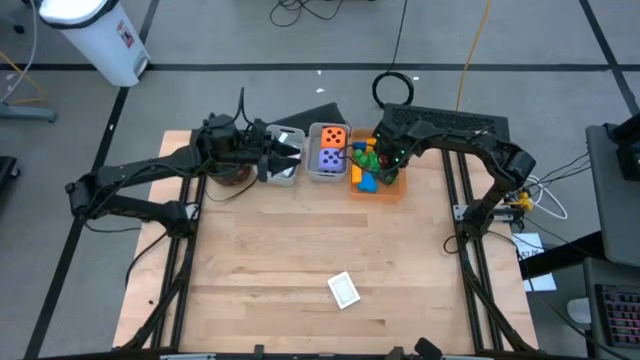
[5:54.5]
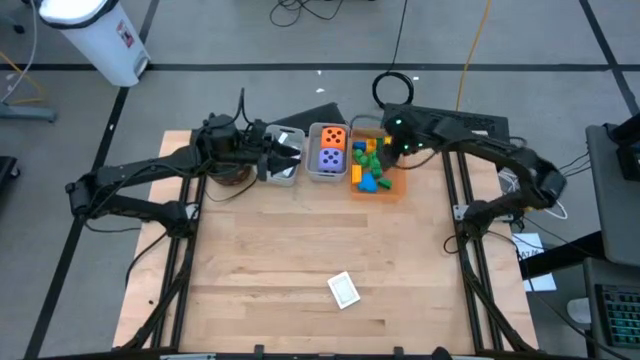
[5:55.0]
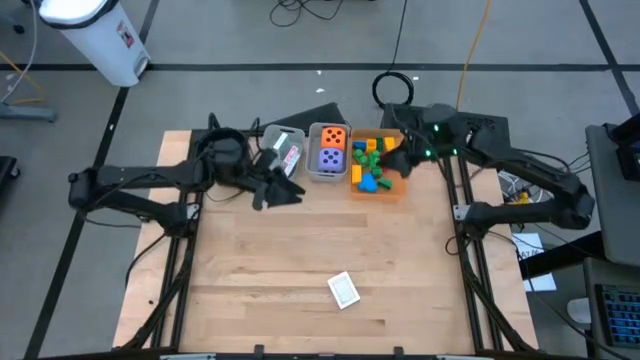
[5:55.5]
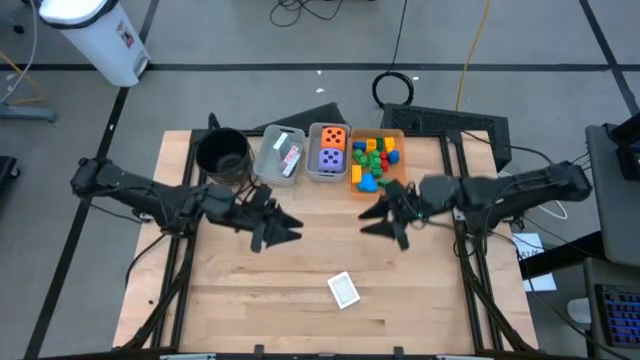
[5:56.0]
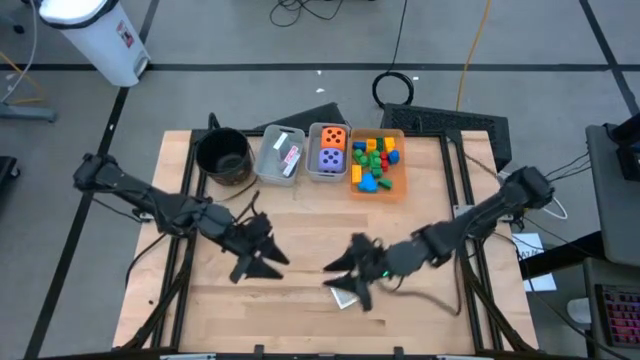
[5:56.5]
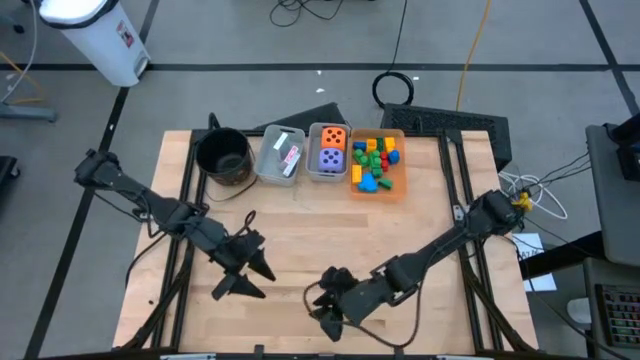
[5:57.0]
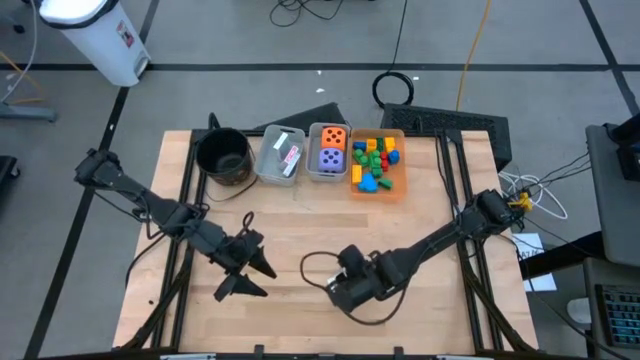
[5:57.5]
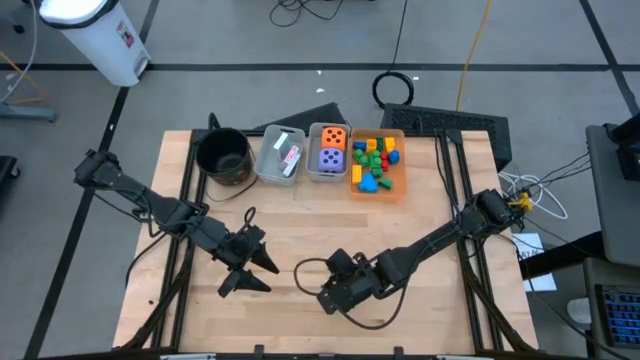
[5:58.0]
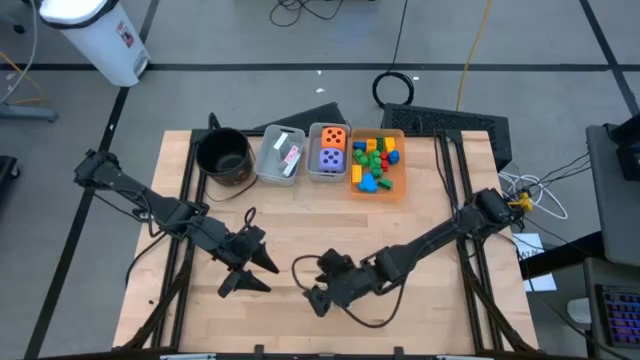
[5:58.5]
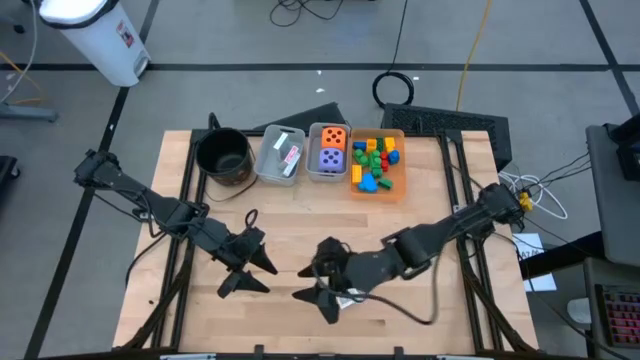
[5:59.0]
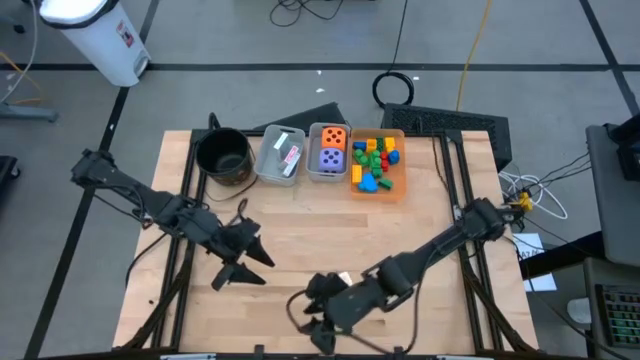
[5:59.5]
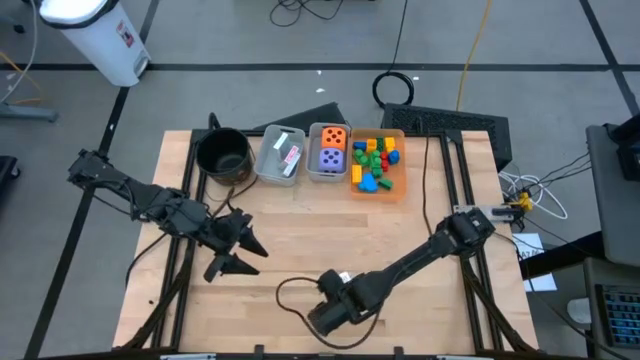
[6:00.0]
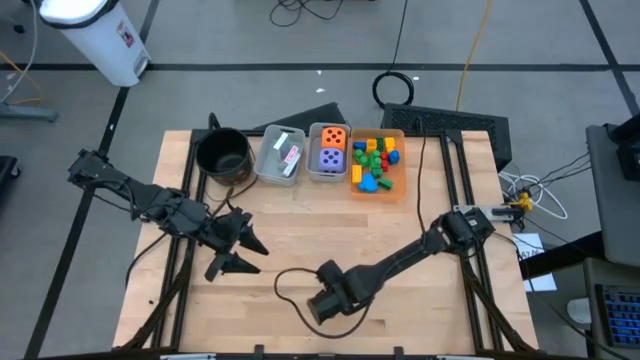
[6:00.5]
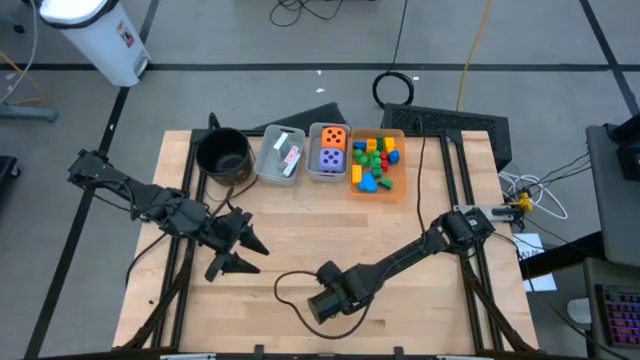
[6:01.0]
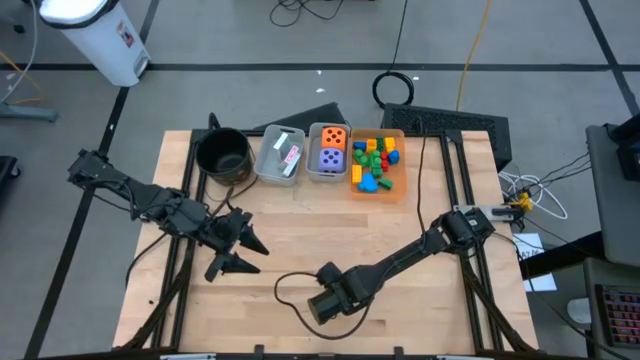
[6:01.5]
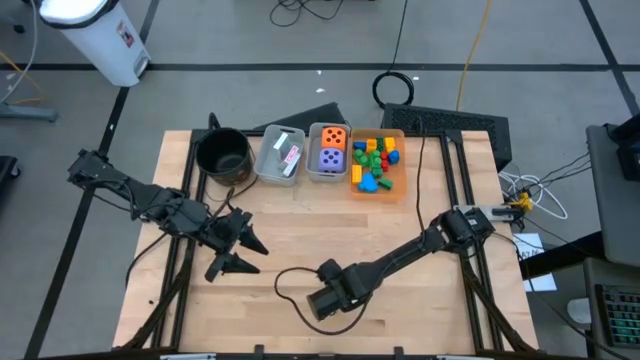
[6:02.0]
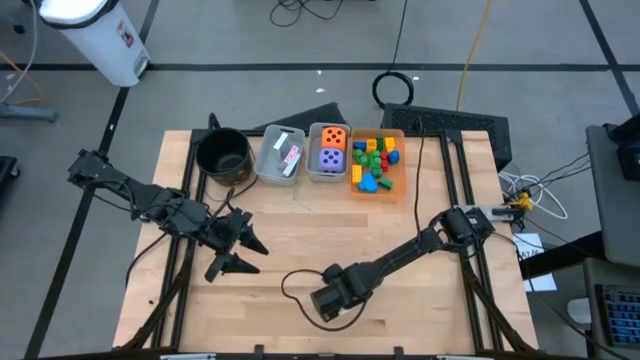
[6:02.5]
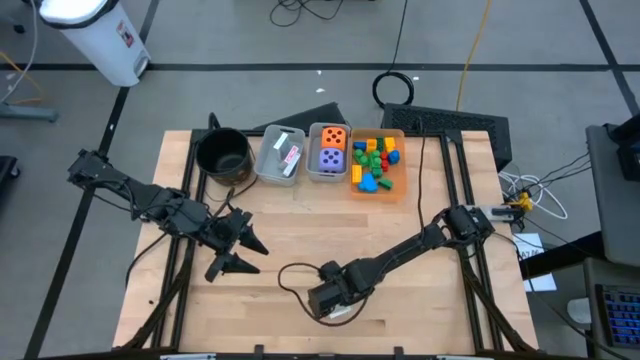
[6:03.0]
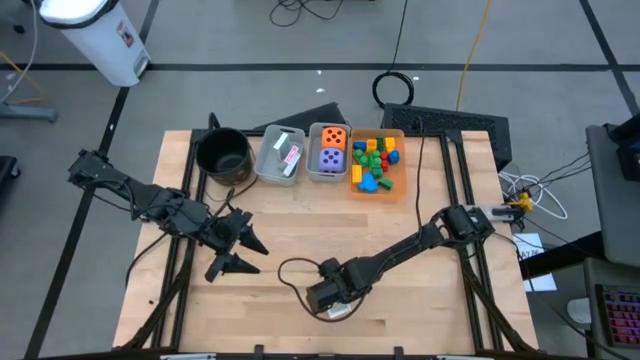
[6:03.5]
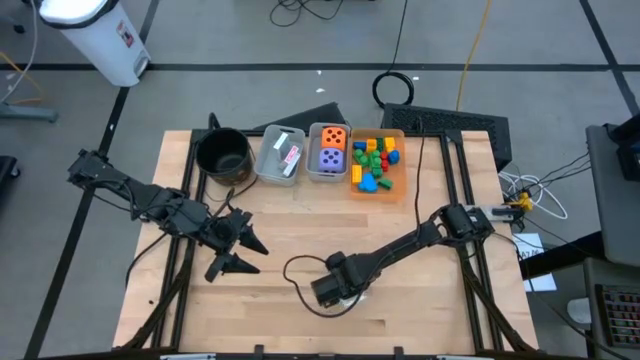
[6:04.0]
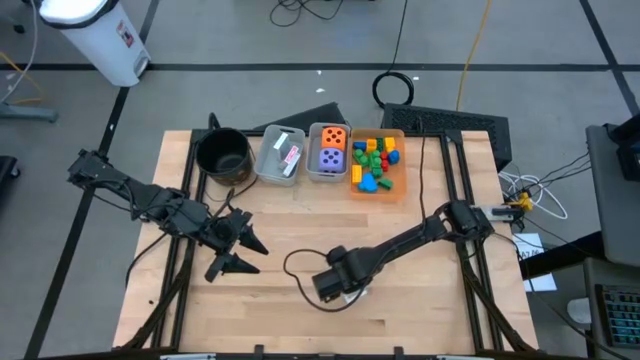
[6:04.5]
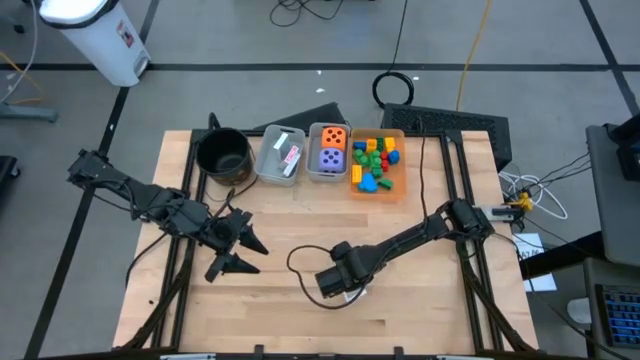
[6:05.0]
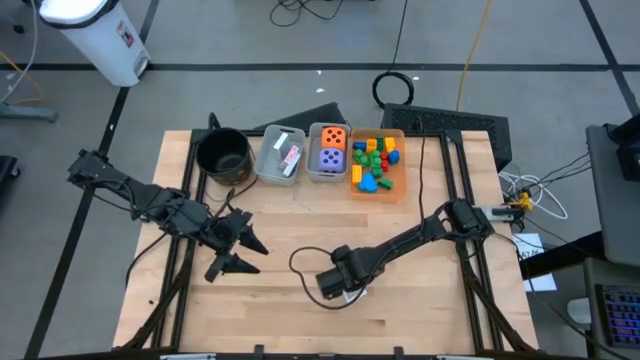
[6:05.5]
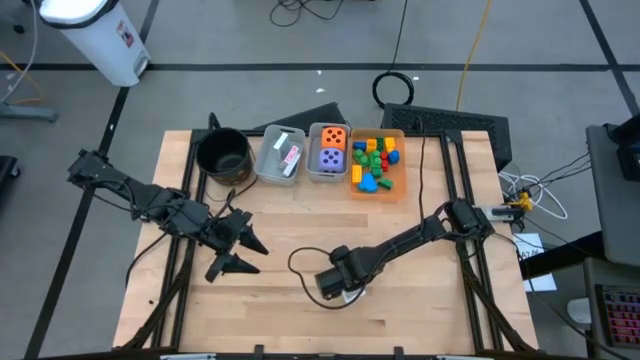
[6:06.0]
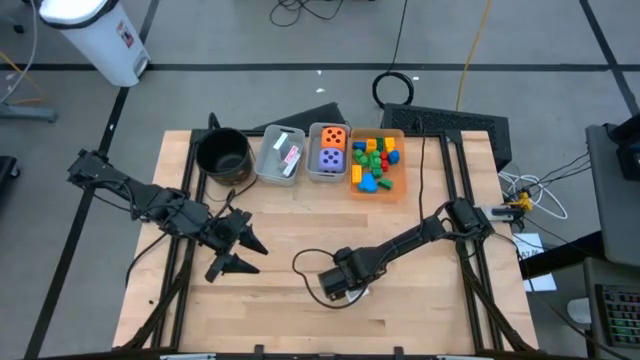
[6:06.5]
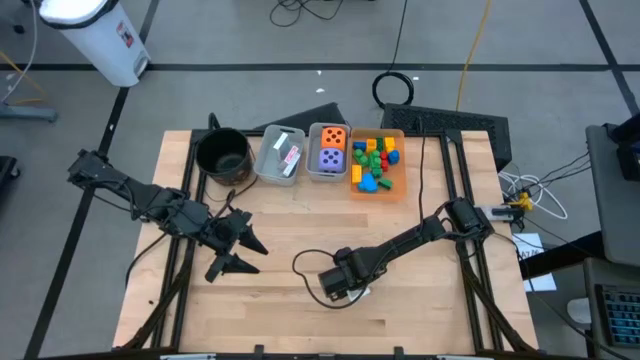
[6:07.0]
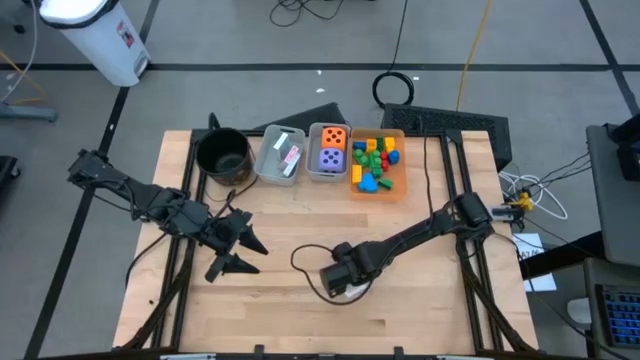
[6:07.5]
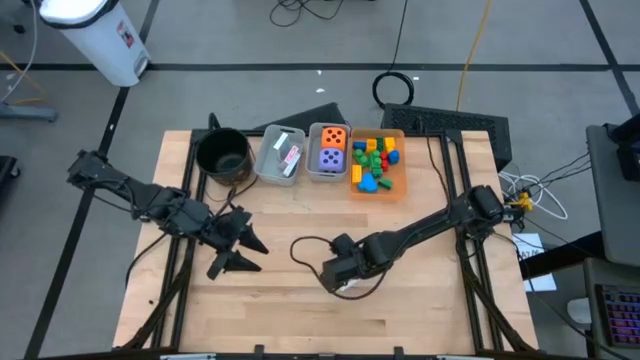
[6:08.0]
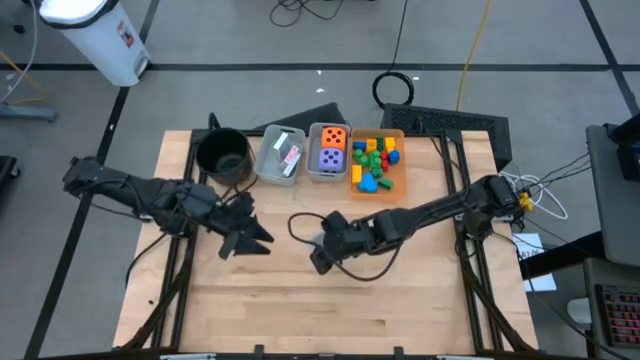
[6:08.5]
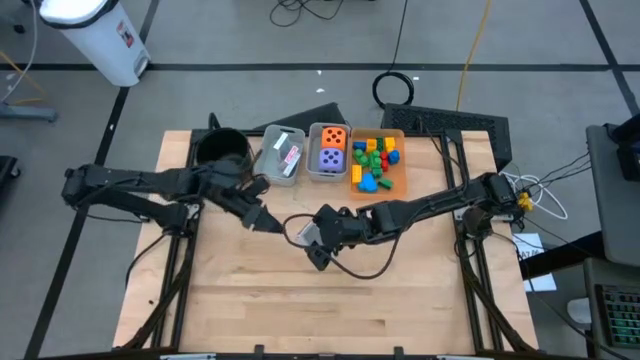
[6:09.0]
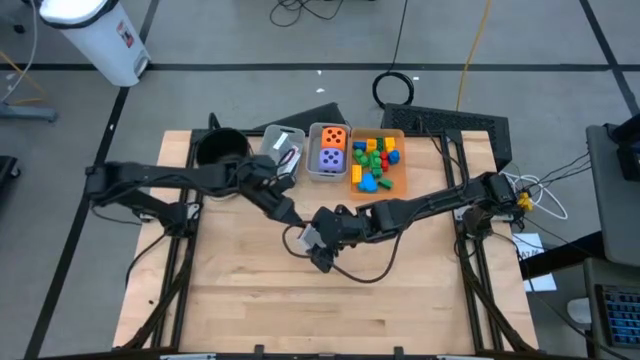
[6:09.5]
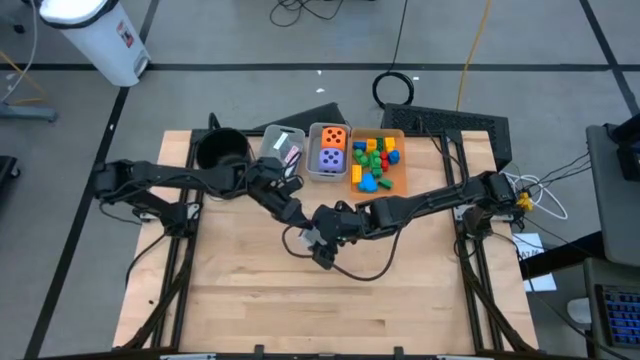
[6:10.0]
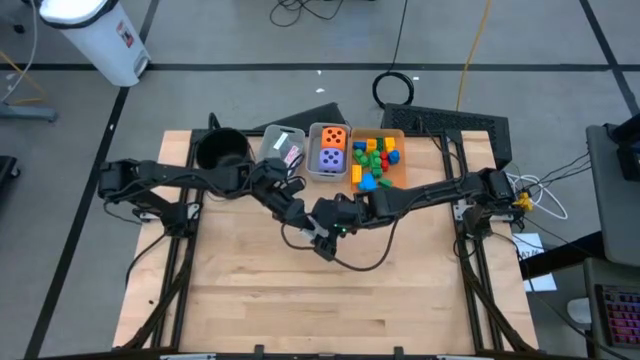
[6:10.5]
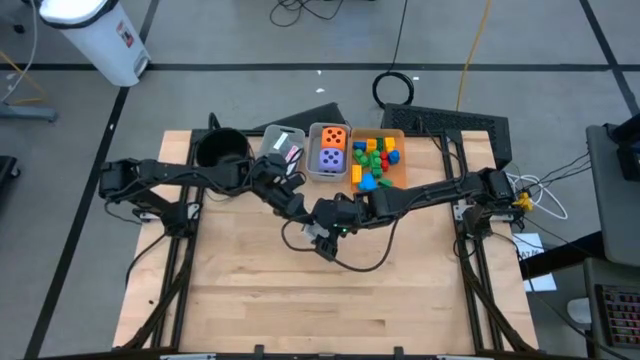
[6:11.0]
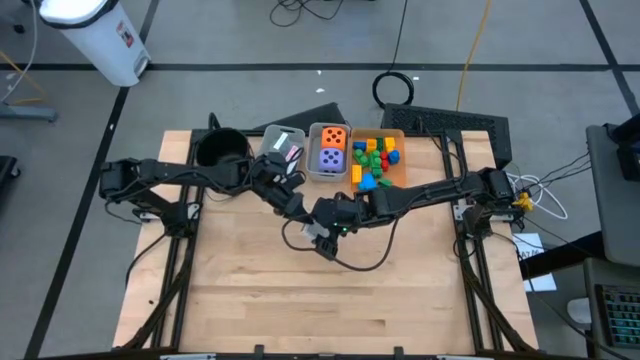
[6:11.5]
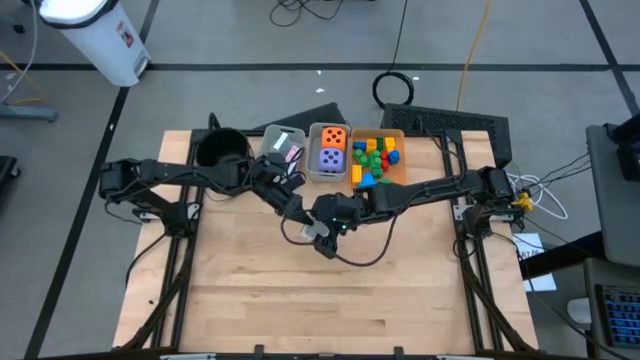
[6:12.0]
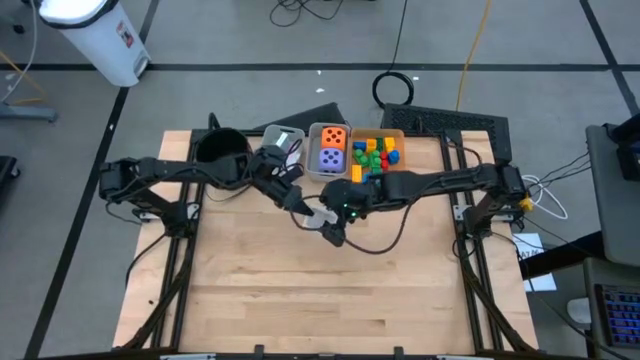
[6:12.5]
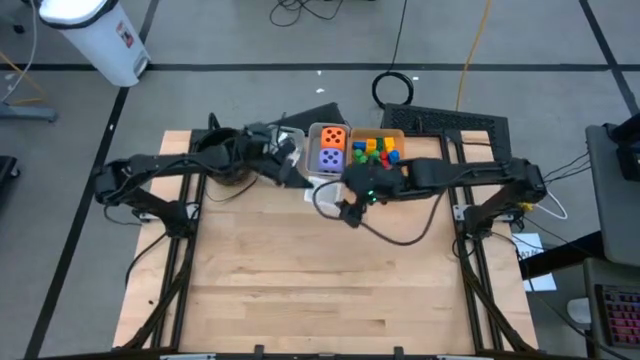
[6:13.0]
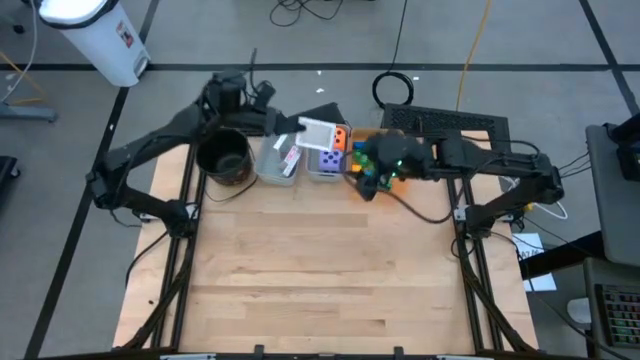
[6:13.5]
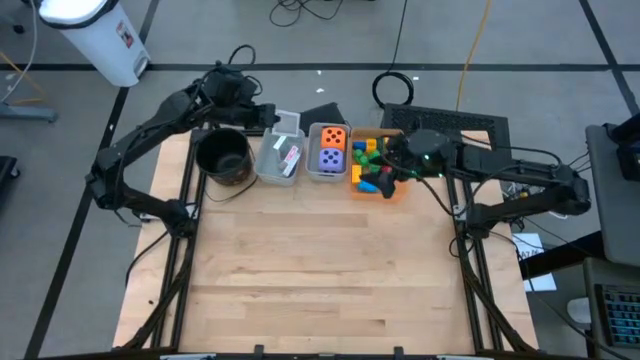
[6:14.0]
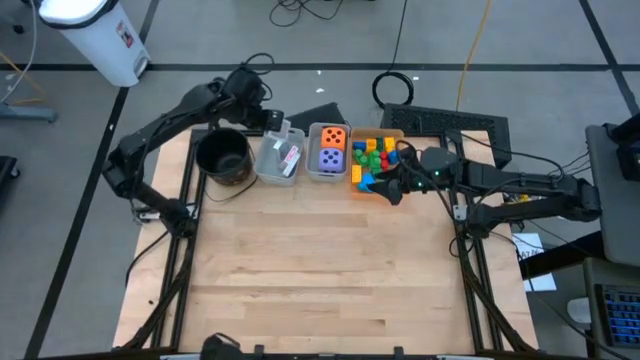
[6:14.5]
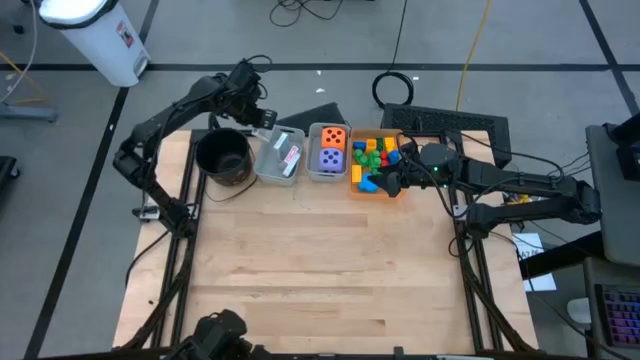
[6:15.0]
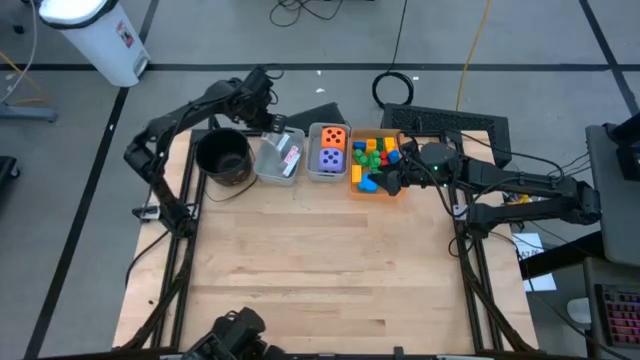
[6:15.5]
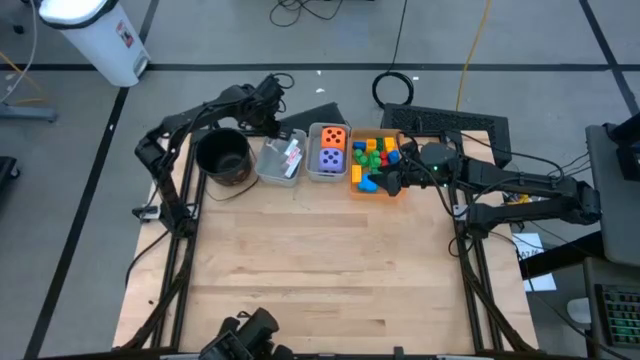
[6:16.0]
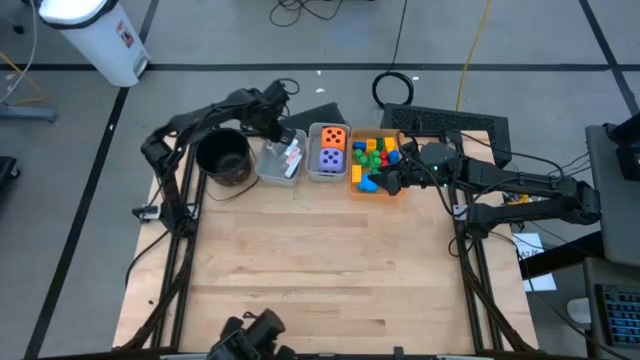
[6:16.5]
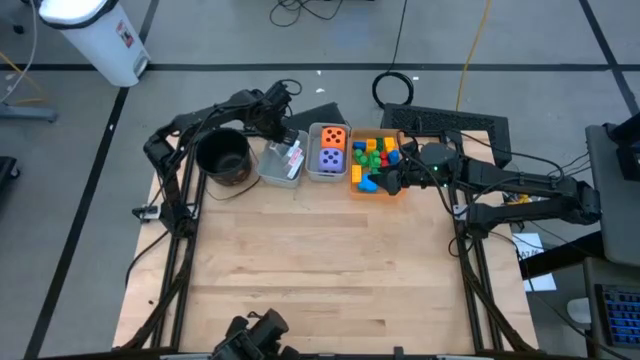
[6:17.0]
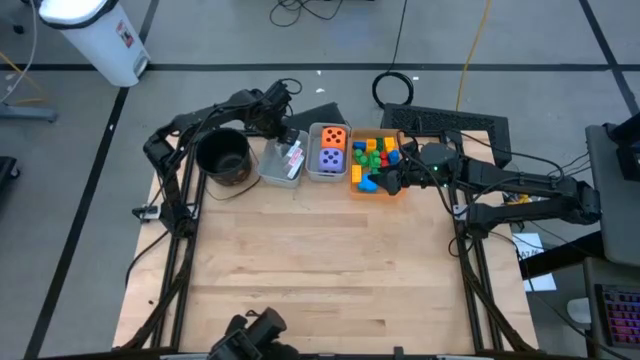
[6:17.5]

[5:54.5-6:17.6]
Task: Pick & Place Toys
Put the brown deck of cards into the left gray bin
